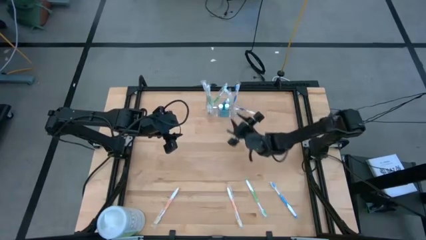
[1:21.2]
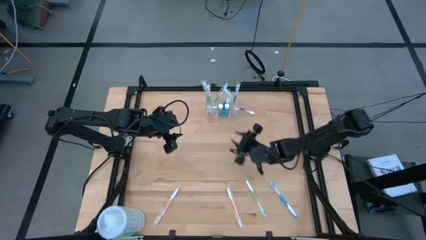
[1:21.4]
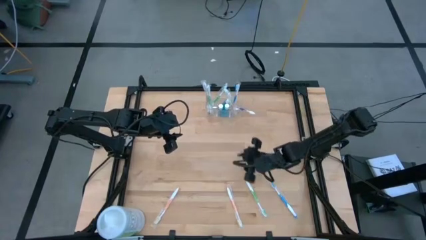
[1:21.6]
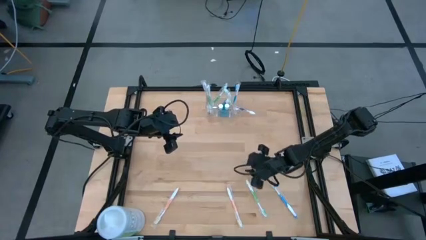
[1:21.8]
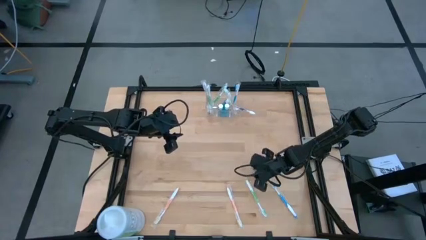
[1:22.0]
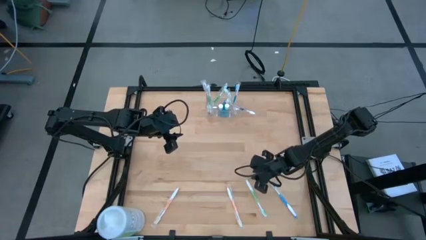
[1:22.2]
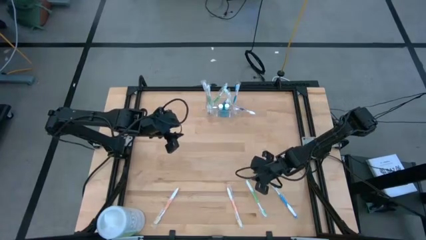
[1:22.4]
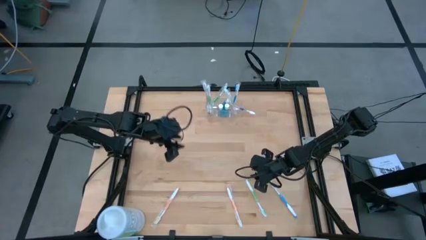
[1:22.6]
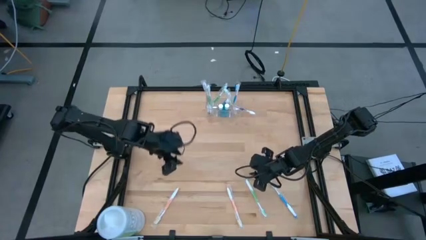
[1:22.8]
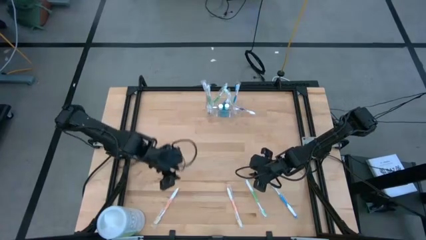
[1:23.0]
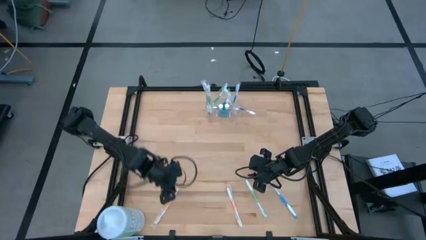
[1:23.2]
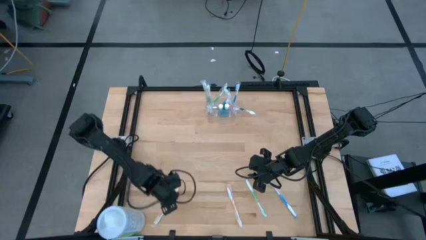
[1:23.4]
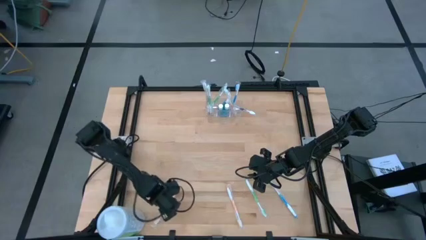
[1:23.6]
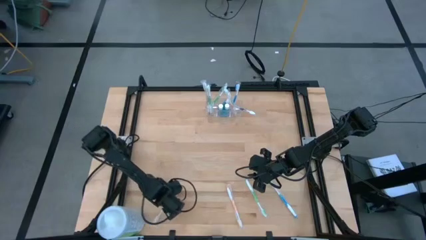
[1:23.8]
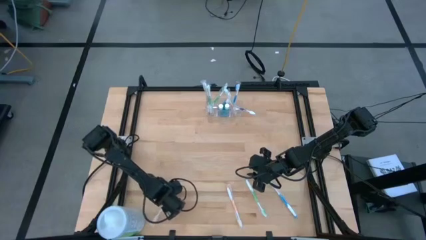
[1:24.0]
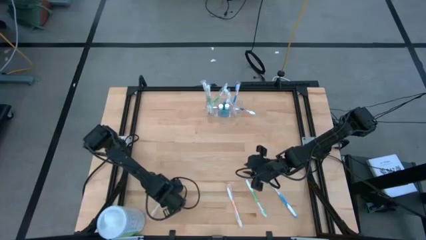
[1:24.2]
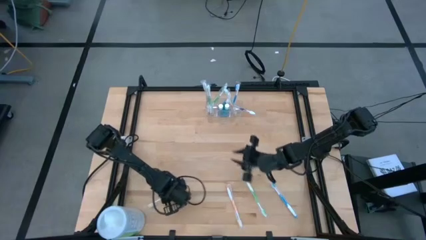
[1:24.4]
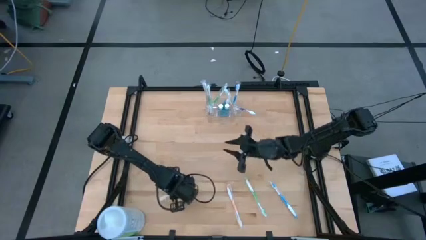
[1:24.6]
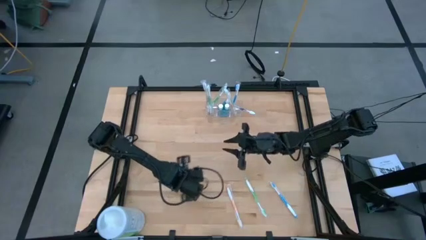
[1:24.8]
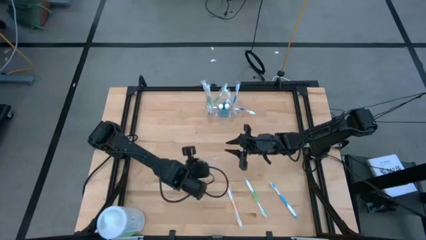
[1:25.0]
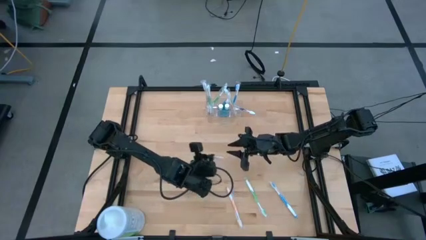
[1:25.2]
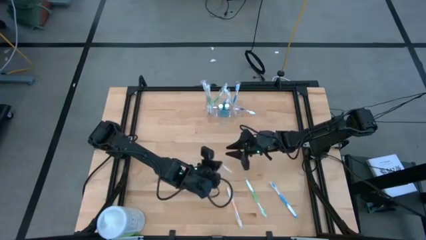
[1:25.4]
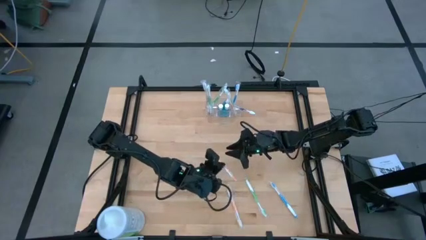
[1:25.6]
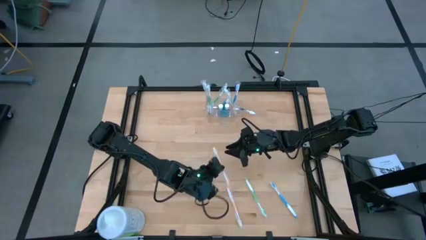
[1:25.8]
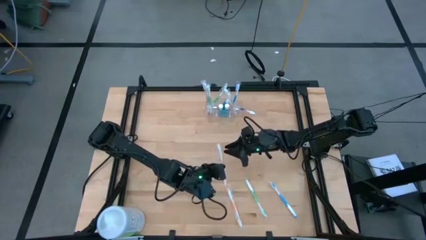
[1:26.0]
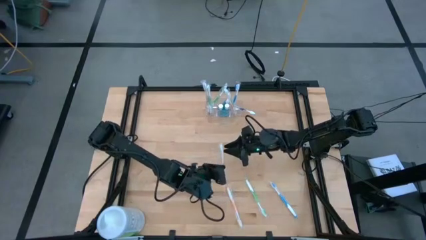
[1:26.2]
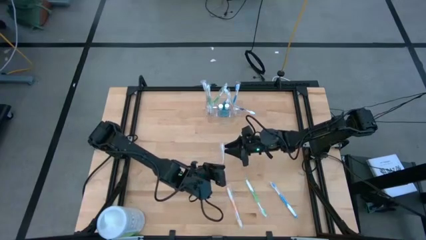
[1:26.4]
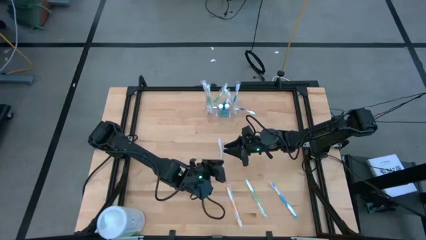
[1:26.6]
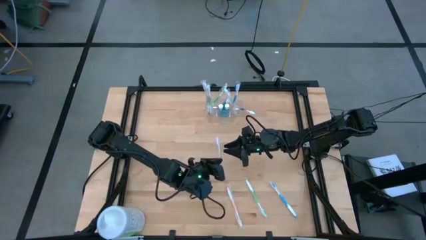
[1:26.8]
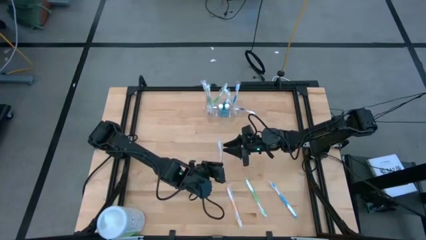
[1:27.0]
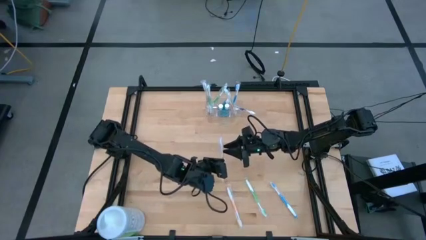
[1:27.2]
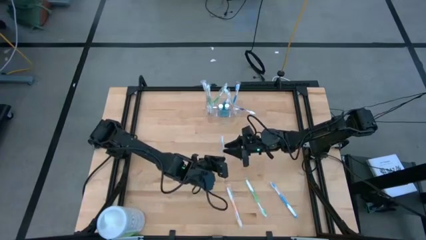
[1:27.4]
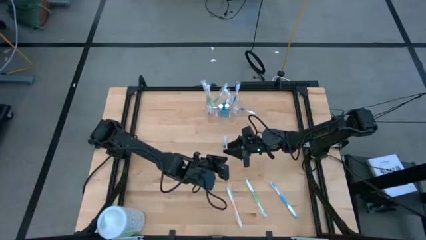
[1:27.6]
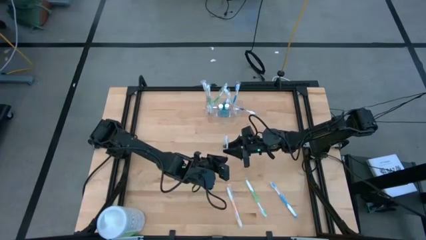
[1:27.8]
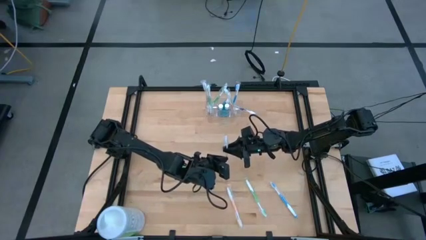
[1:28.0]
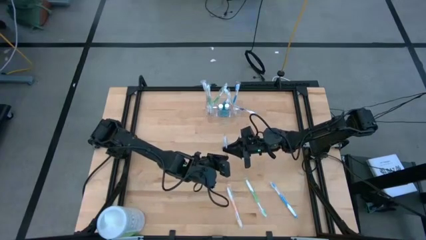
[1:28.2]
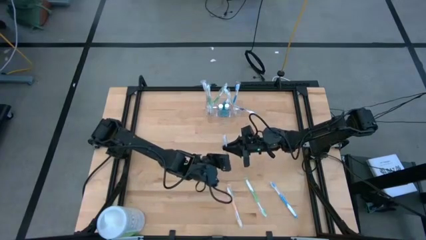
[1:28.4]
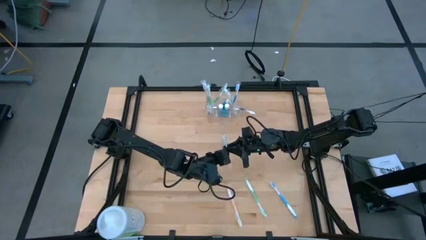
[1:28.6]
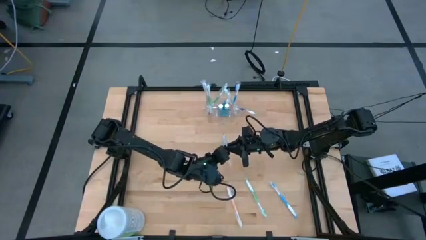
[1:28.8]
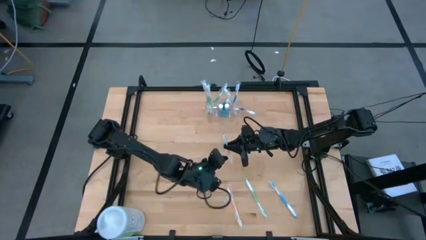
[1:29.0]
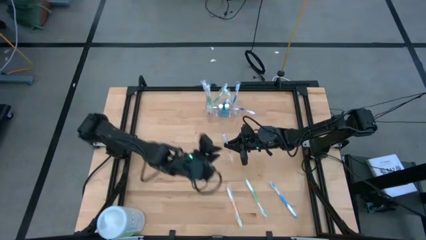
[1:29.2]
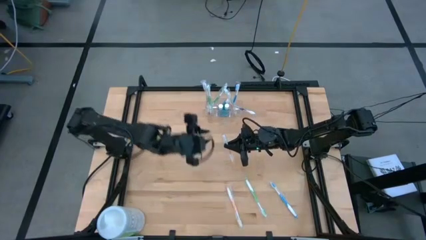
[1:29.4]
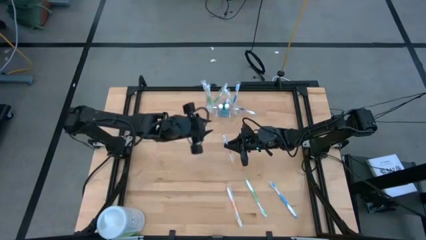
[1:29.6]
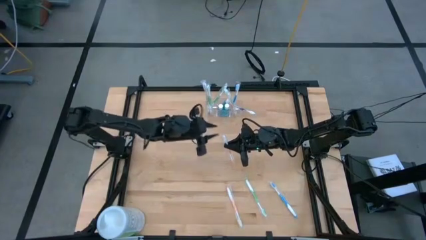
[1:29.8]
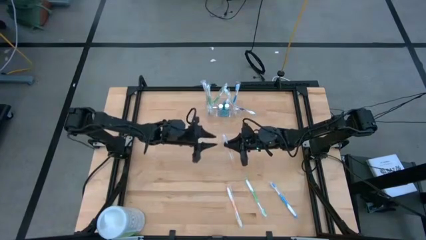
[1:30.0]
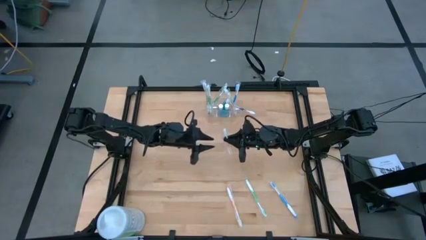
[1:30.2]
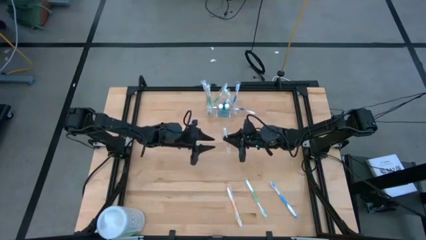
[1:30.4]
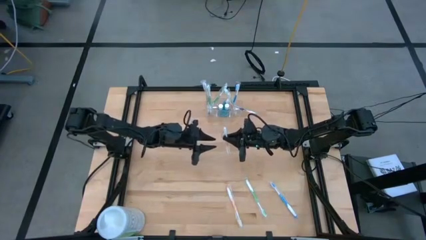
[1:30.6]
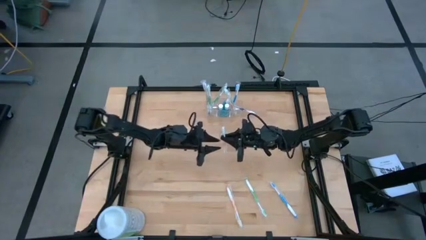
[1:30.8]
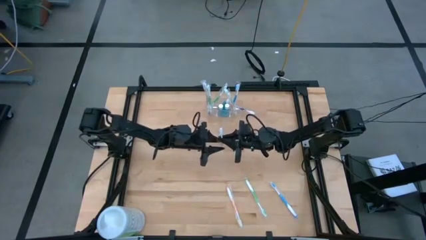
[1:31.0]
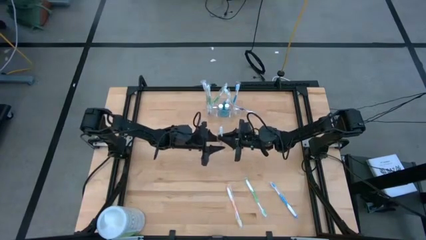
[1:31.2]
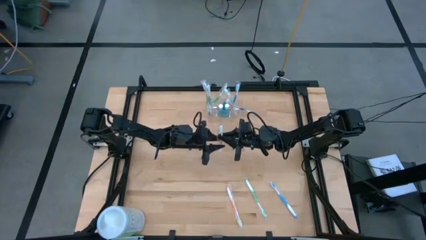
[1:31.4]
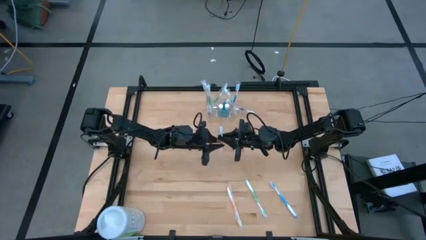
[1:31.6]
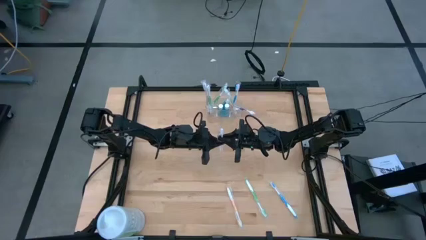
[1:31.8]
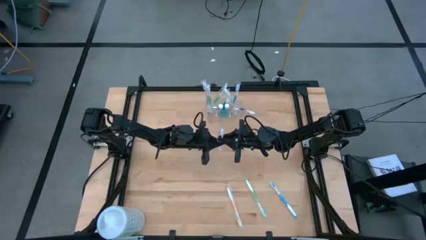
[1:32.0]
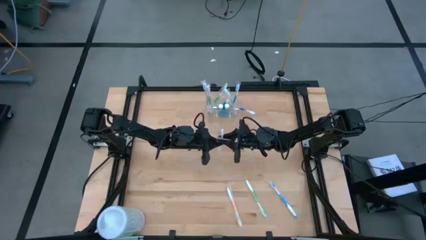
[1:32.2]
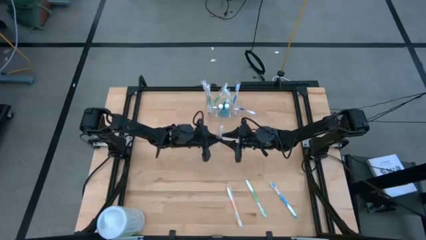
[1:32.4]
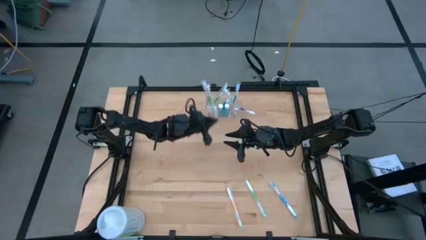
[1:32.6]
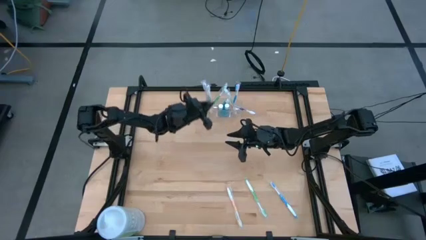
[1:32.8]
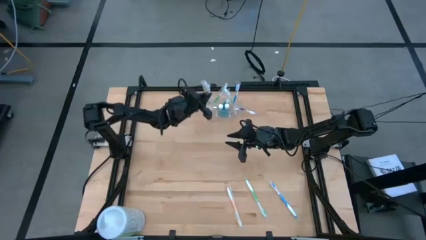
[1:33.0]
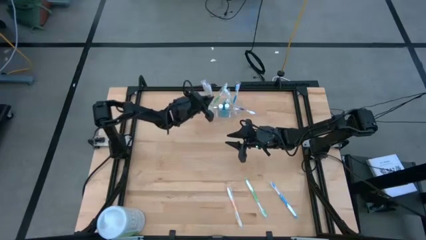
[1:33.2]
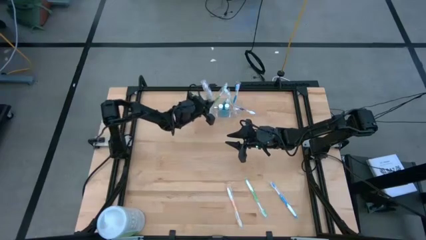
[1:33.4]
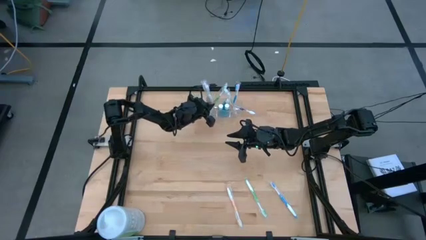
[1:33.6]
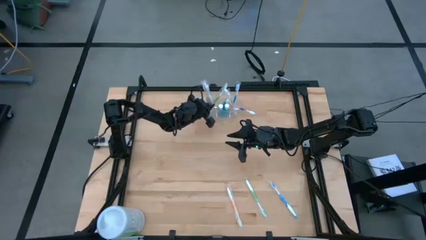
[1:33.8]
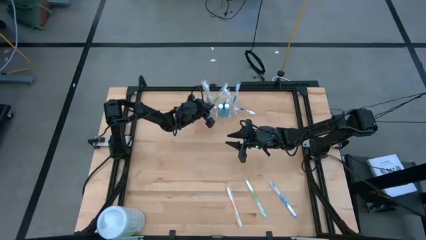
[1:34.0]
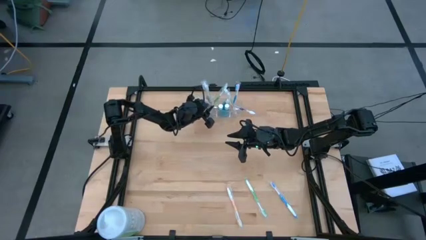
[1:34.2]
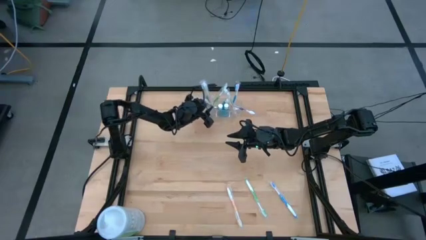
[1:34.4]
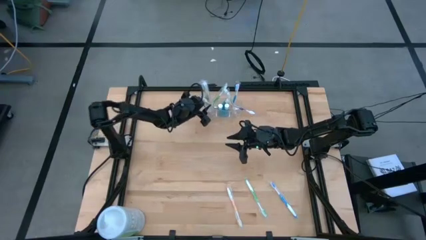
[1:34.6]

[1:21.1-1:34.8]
Task: Pick & Place toothbrushing station
Put the orange toothbrush into the transparent organizer

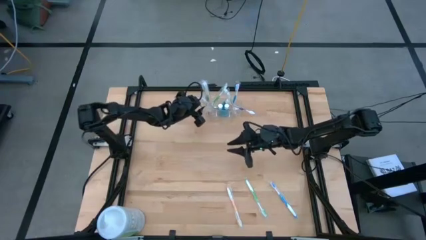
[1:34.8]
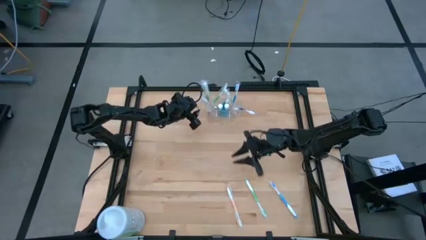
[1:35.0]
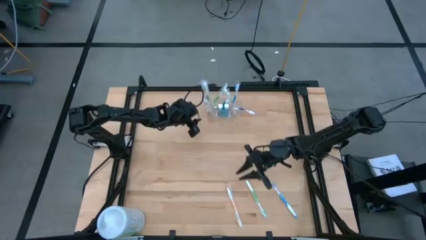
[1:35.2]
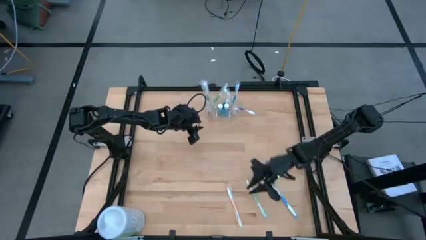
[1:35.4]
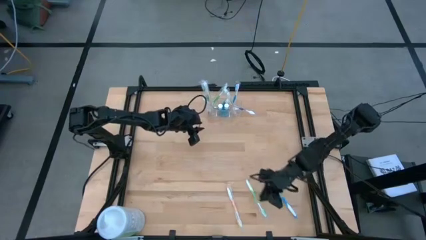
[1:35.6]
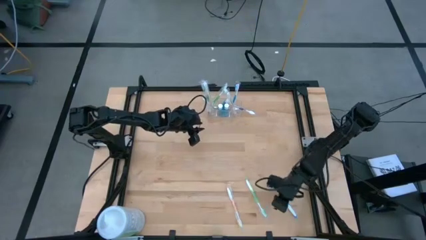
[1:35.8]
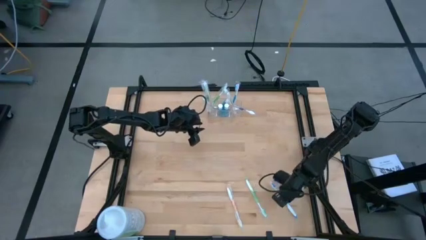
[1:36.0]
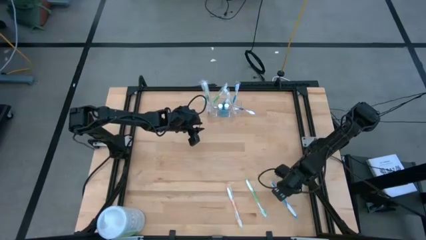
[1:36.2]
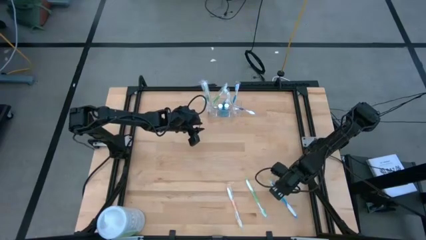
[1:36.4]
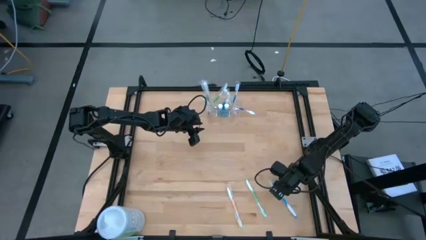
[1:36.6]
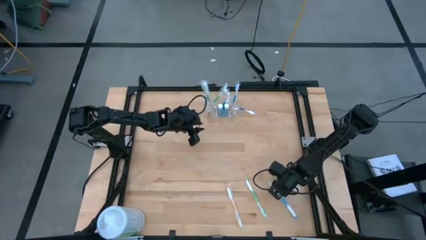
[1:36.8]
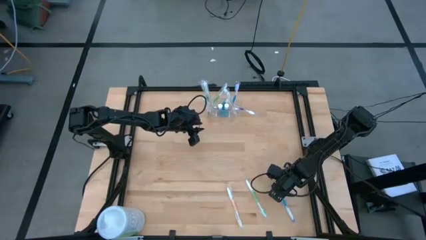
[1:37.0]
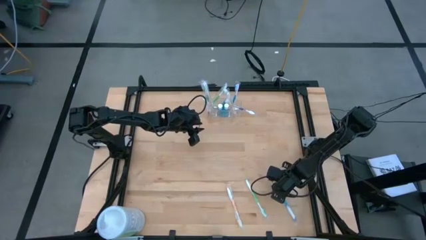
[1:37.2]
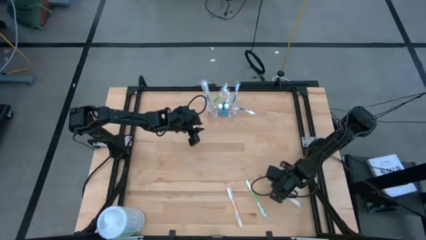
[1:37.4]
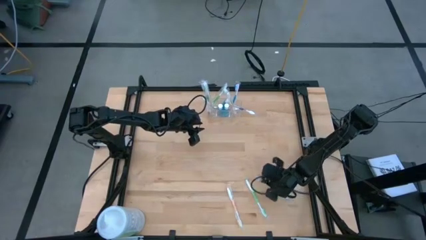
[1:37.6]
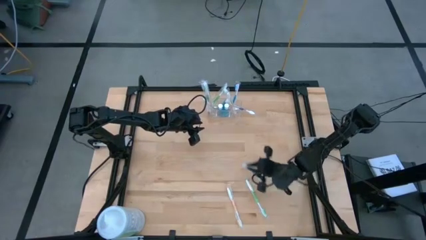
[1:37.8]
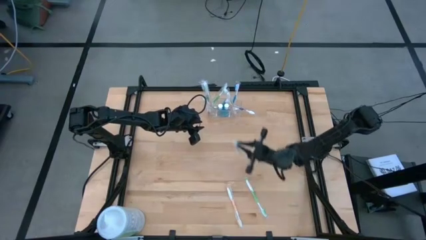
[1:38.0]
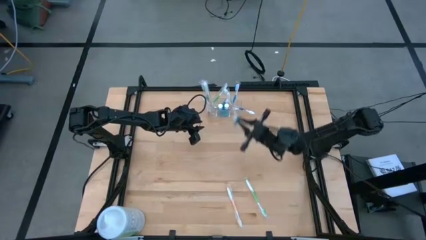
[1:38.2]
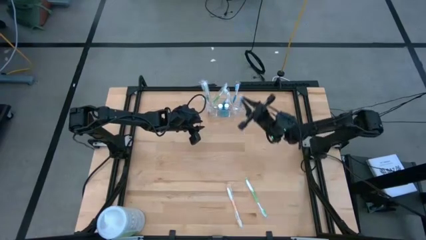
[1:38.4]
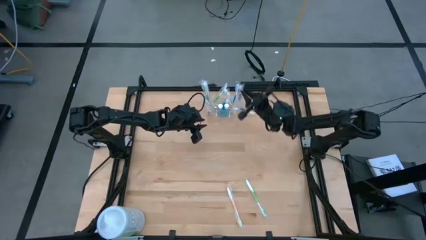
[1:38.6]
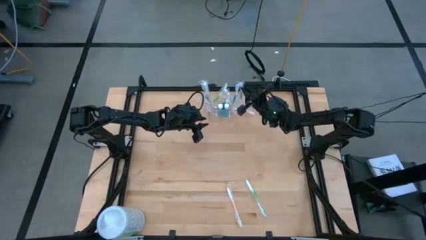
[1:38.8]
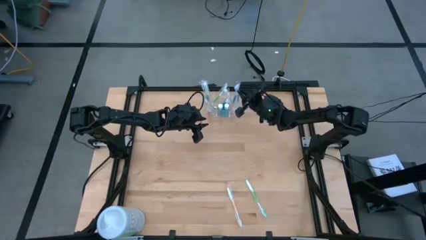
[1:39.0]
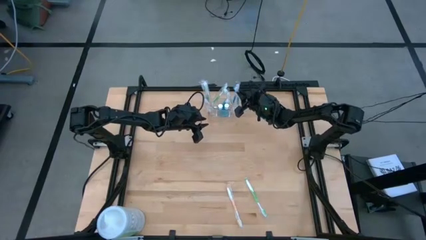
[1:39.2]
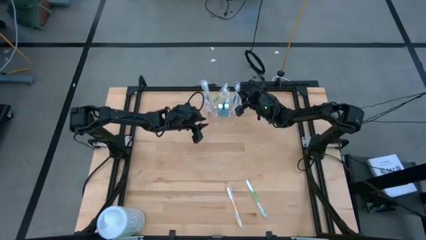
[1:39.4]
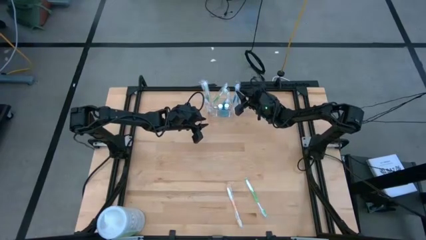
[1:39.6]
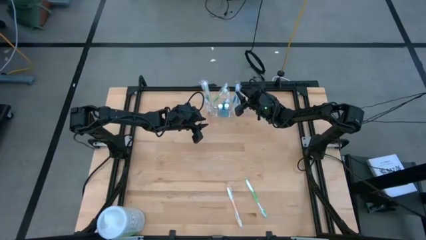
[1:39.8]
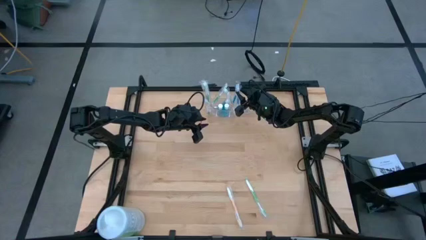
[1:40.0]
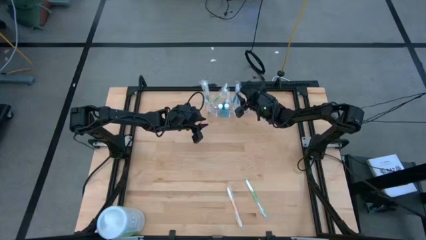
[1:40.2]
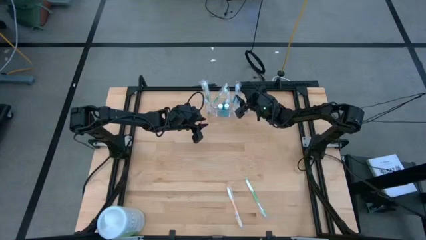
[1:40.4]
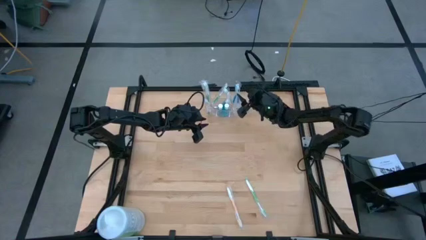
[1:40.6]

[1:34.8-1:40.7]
Put the blue toothbrush into the transparent organizer
